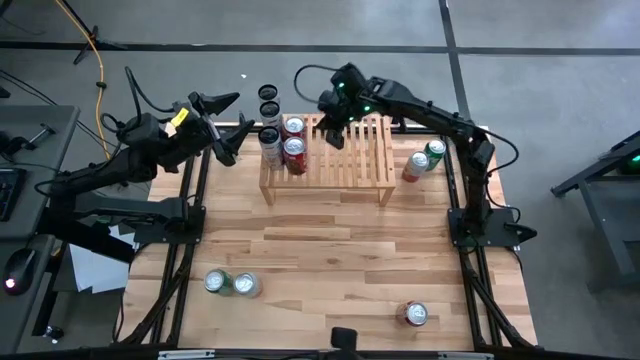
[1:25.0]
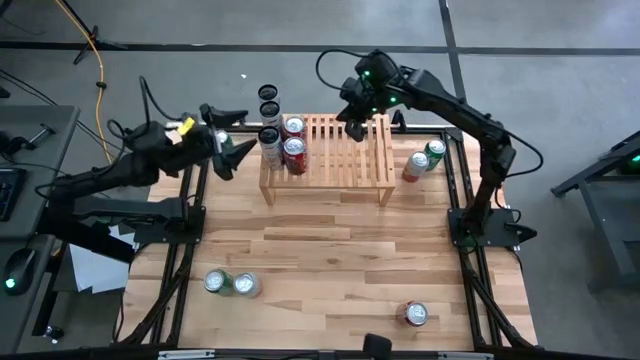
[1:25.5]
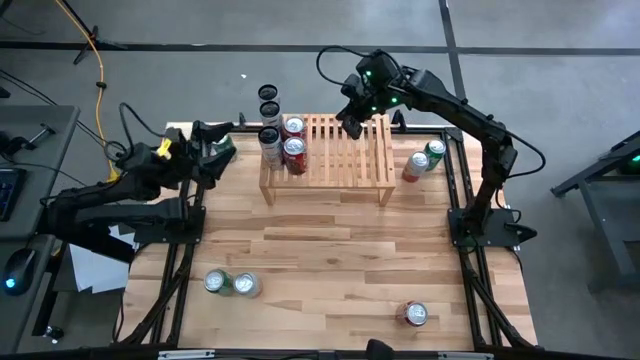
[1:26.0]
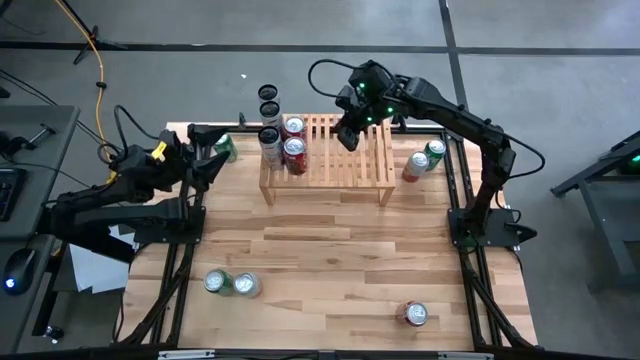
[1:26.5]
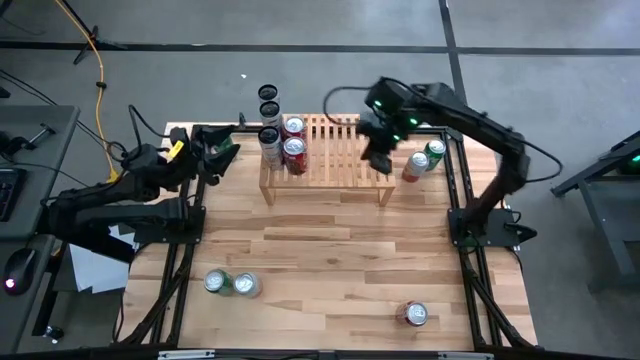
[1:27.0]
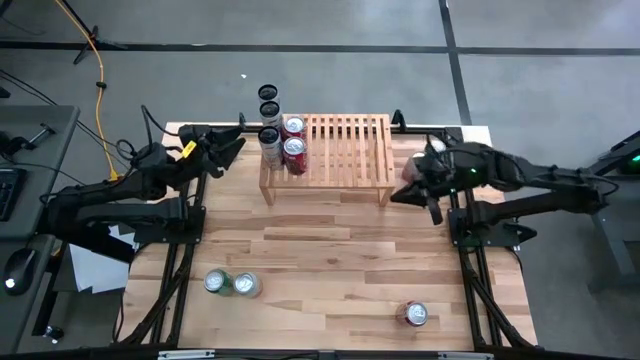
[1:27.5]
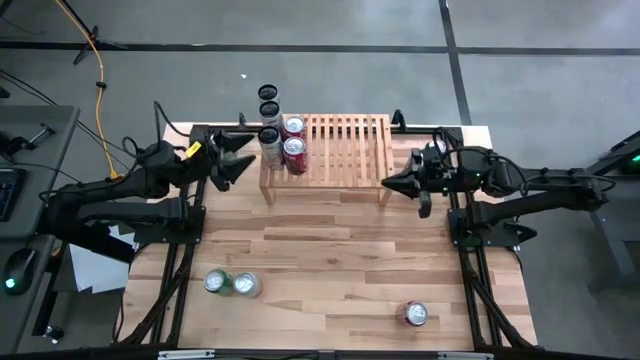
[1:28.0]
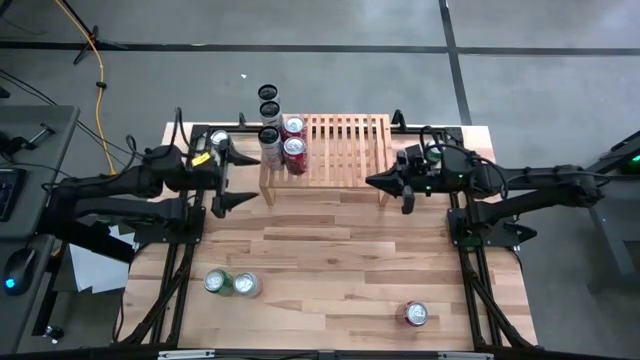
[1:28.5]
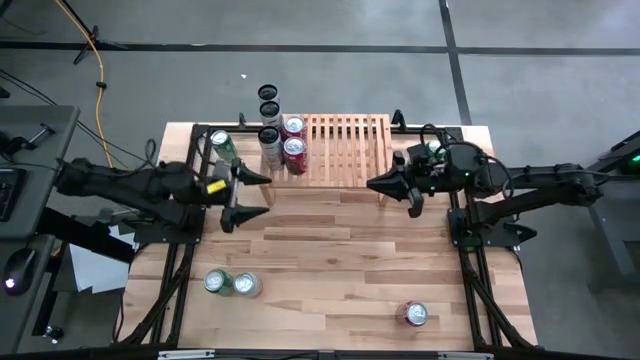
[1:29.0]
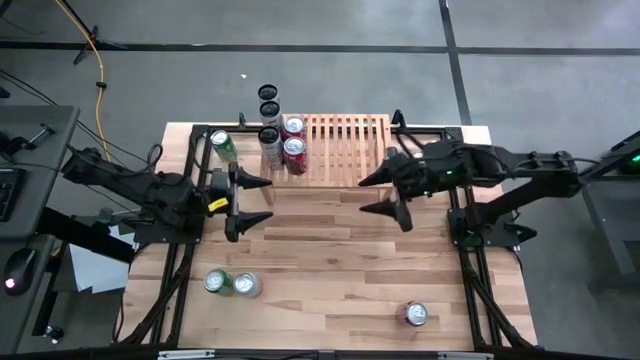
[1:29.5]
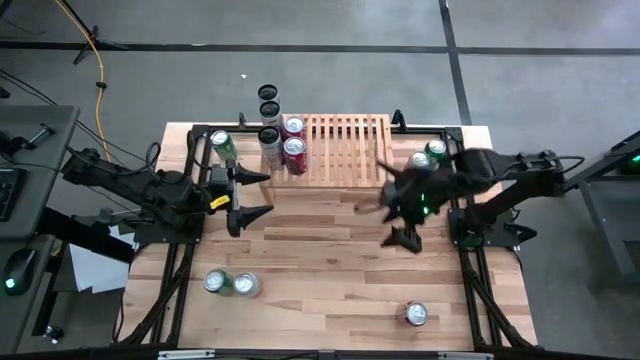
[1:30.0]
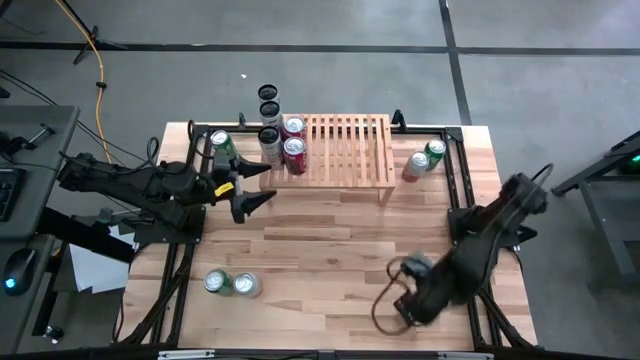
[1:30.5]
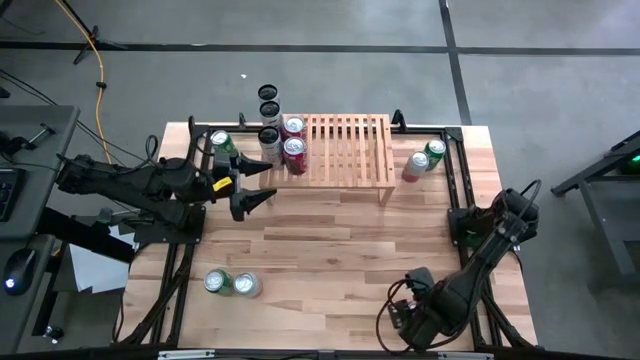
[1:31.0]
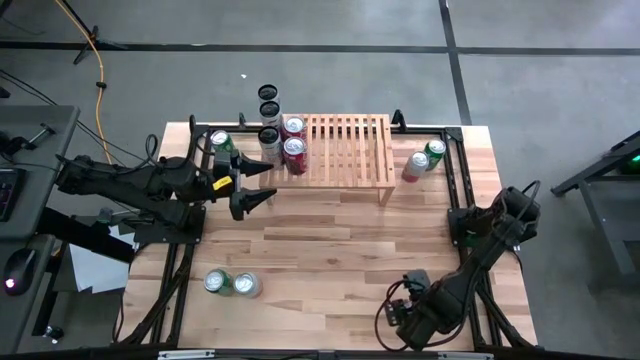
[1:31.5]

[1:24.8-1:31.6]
Task: Place canned beverage on shelf
Put the red-white soda can on the shelf aligned with the other red-white soda cans

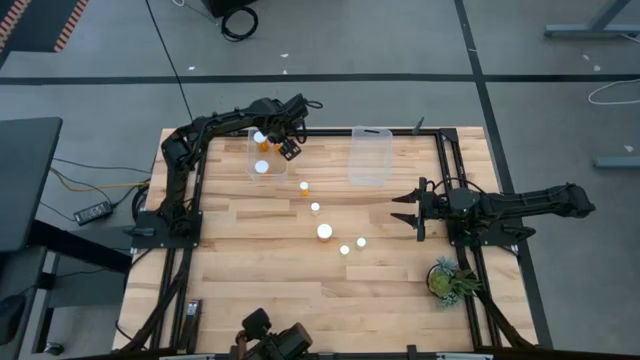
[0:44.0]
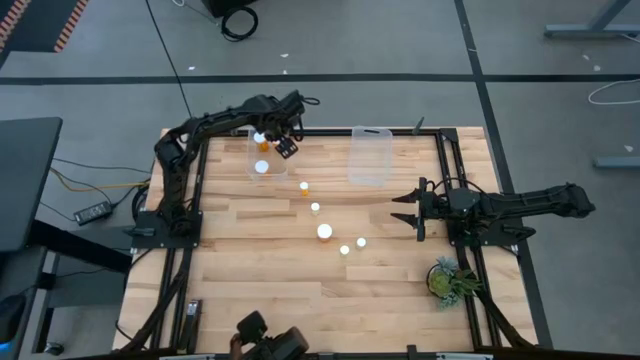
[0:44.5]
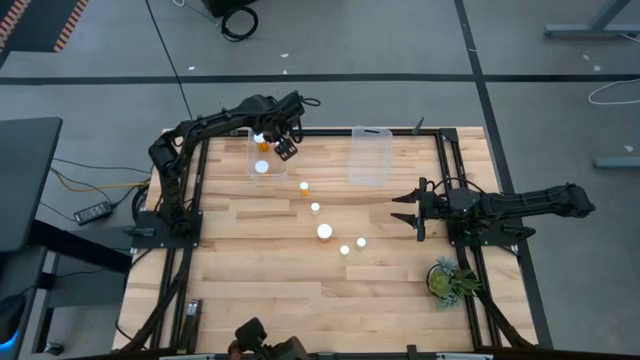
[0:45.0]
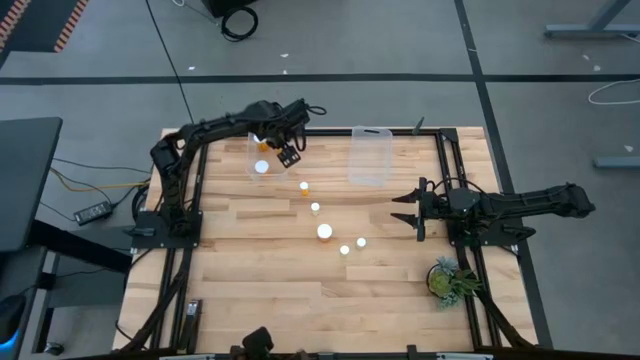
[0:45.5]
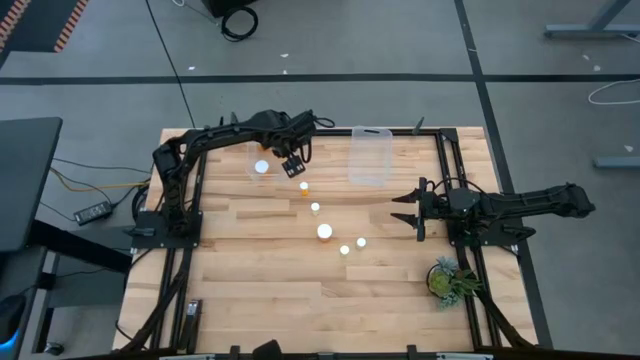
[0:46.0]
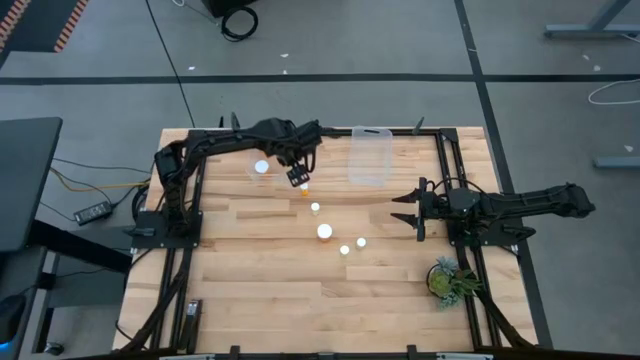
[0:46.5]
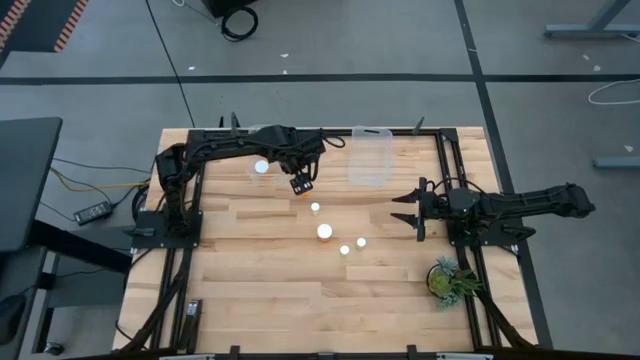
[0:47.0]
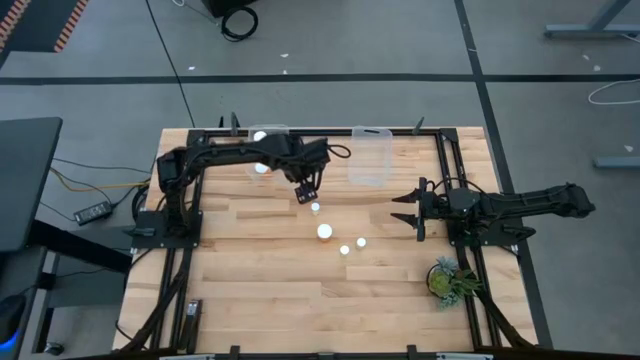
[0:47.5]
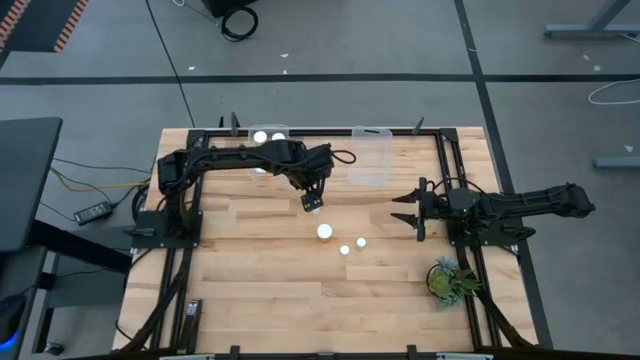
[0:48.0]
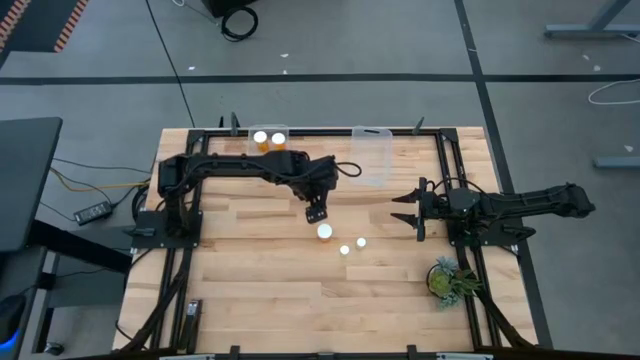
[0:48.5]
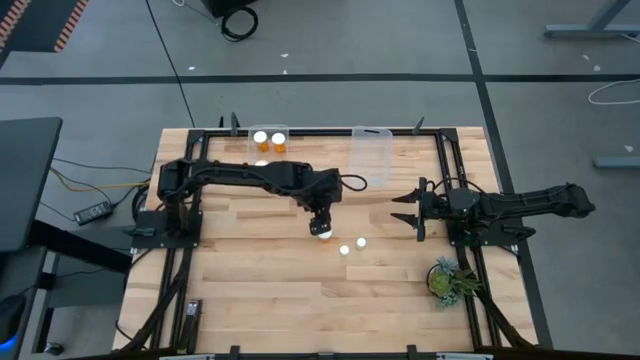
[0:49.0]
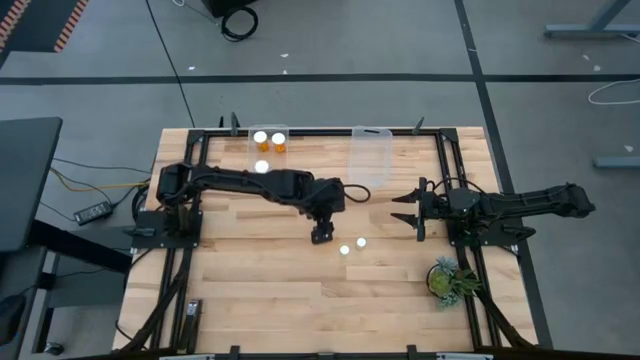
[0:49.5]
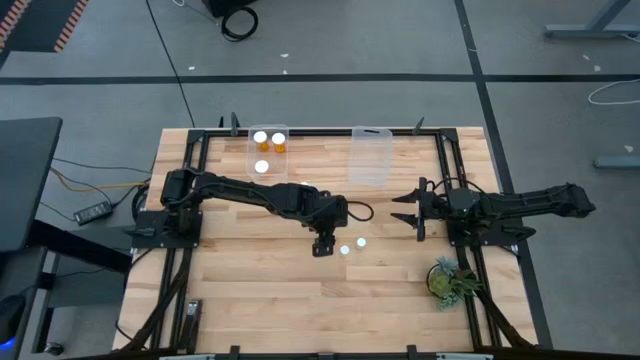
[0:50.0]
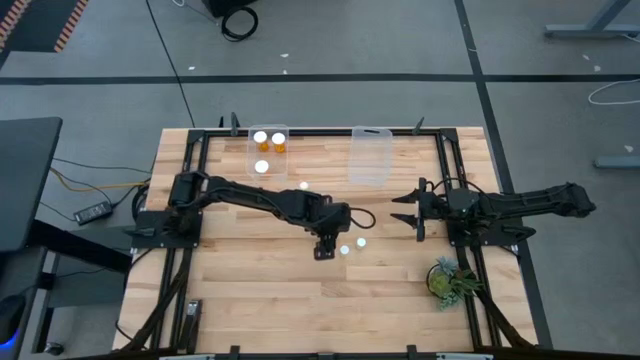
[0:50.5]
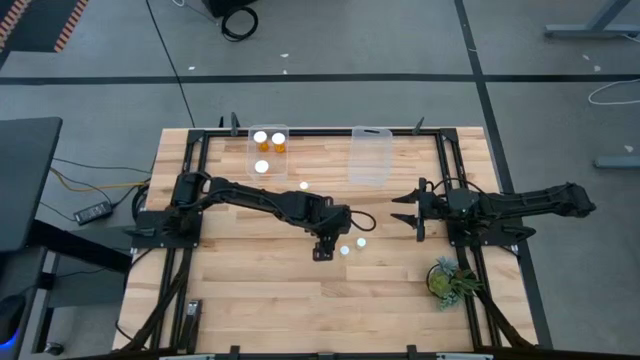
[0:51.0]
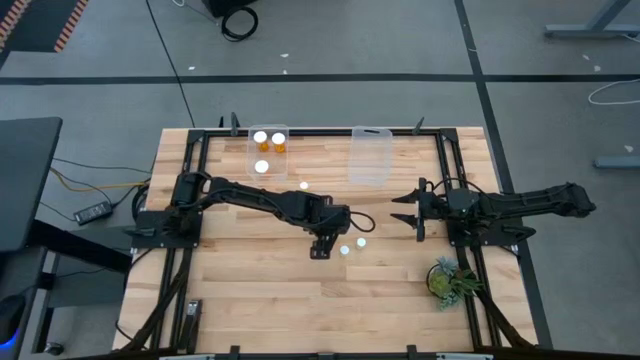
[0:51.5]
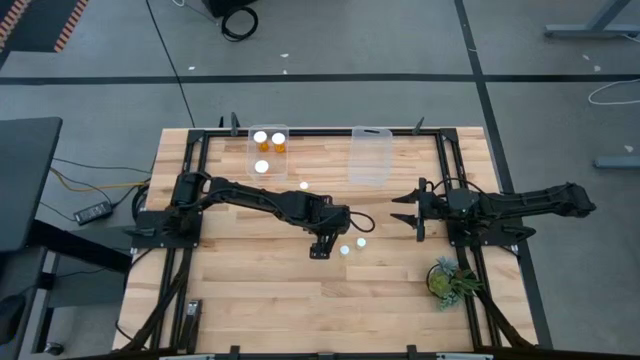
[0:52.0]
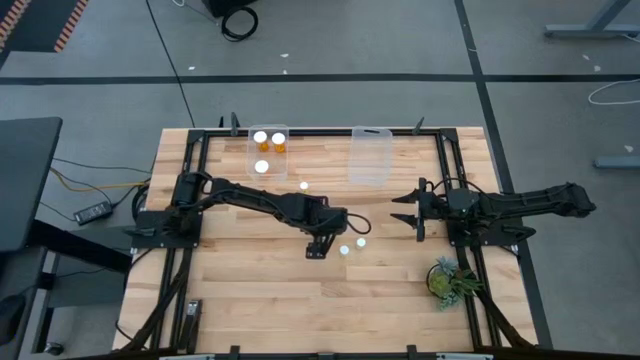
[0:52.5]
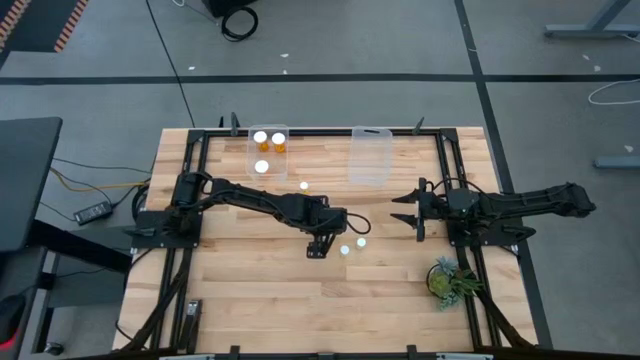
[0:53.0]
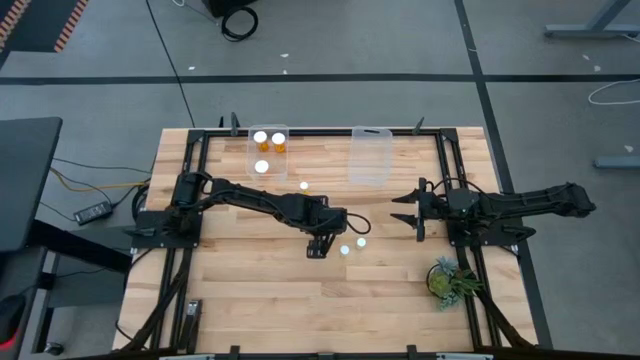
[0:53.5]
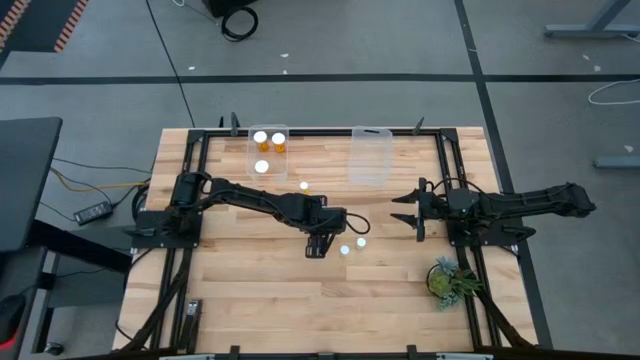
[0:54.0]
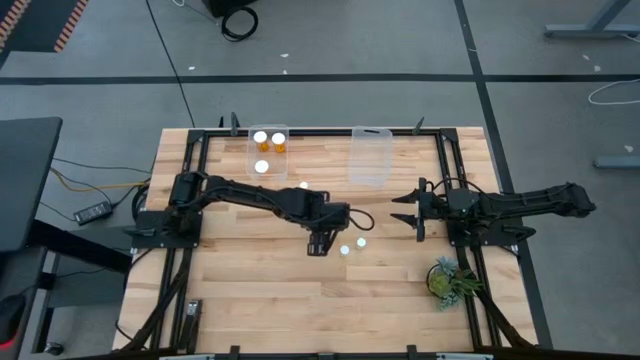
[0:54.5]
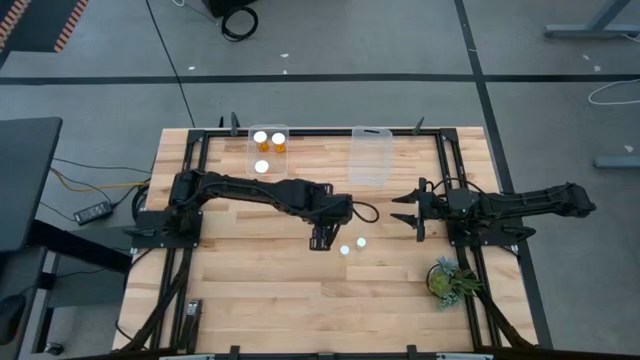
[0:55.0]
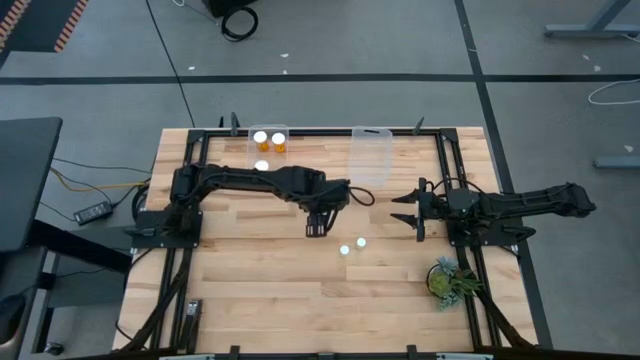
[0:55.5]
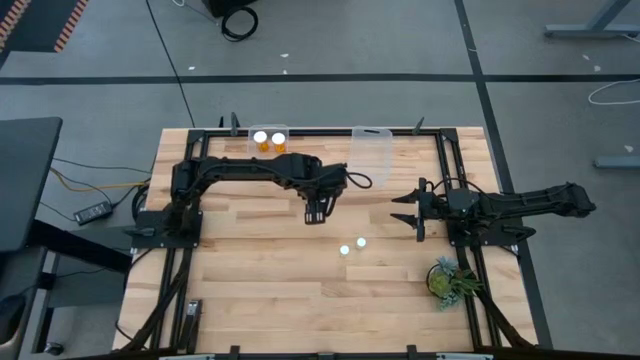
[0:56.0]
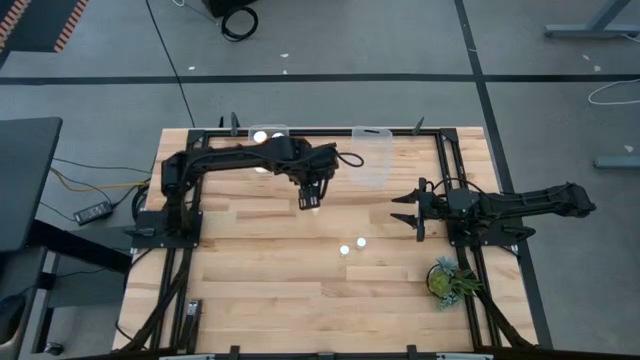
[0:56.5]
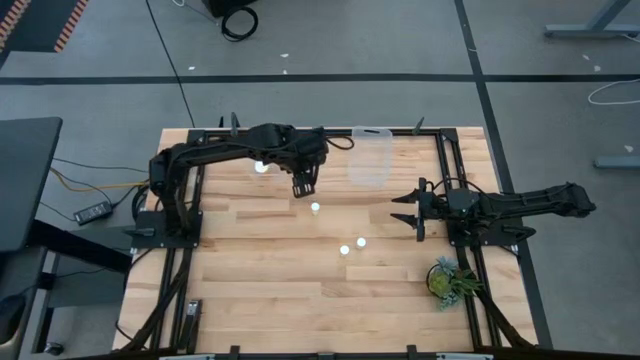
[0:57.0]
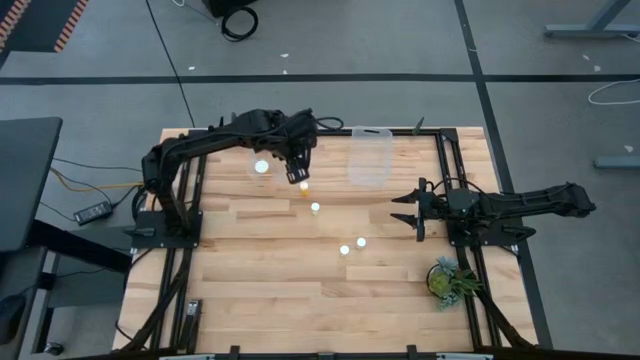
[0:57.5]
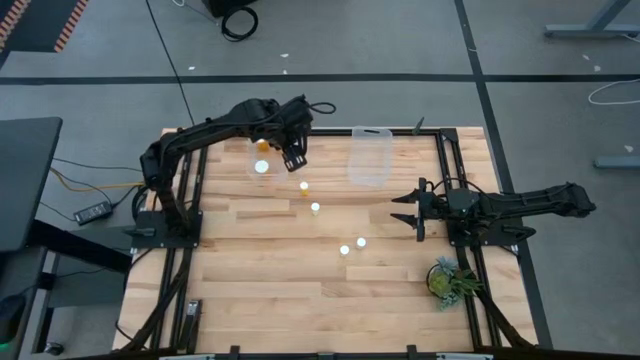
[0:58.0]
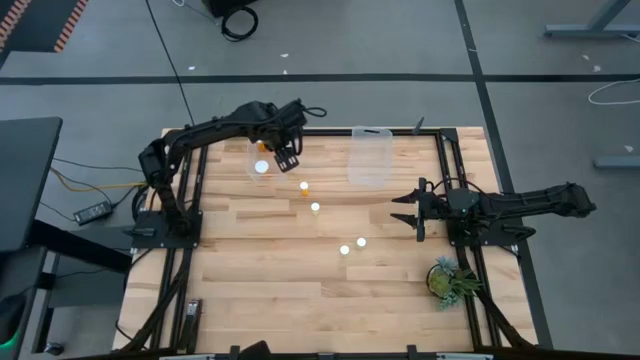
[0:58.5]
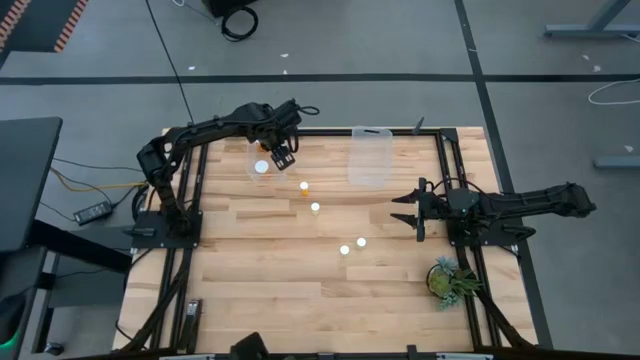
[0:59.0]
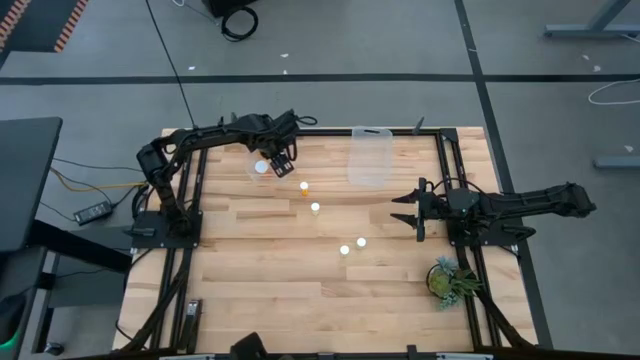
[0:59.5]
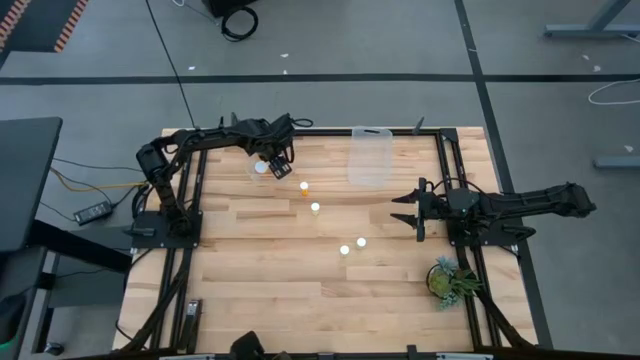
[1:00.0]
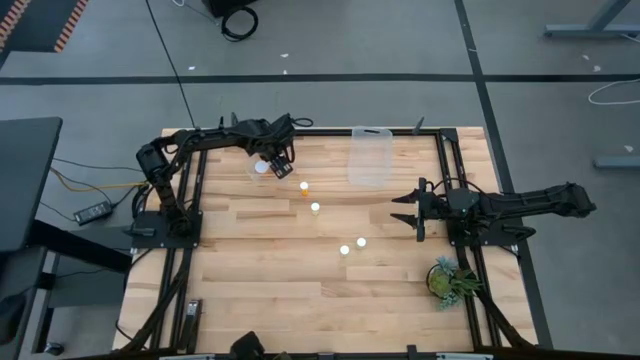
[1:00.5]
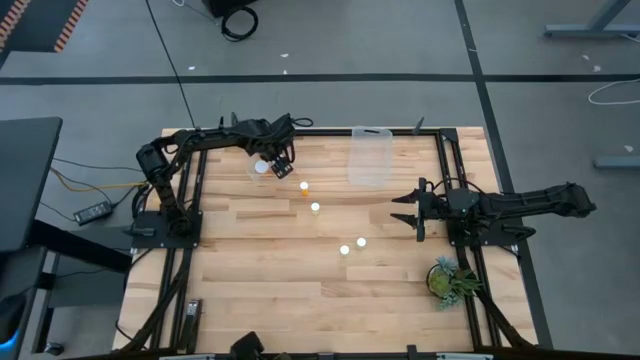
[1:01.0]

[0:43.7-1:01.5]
Task: Pick and place medicine bottles into bin by pill shape (circle, oval)
Put the orange capsule bottle into the left transparent bin
